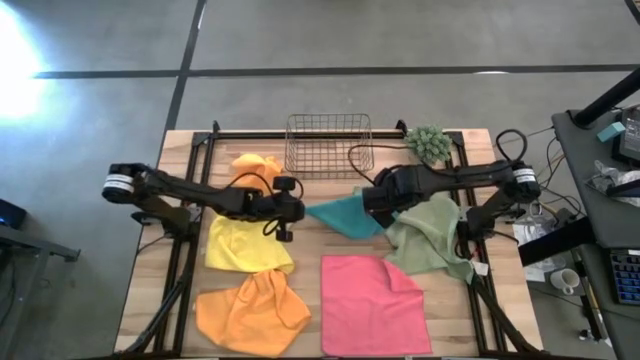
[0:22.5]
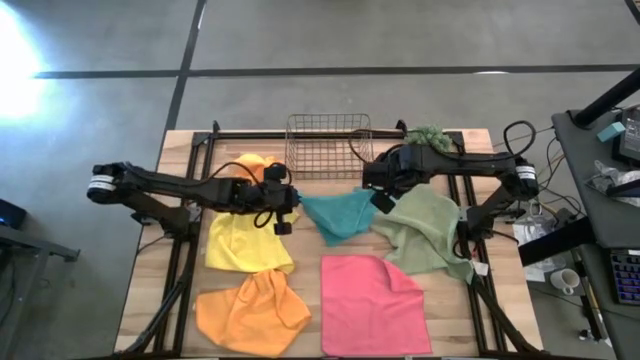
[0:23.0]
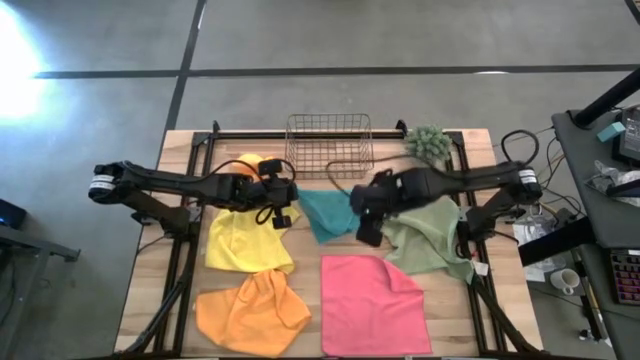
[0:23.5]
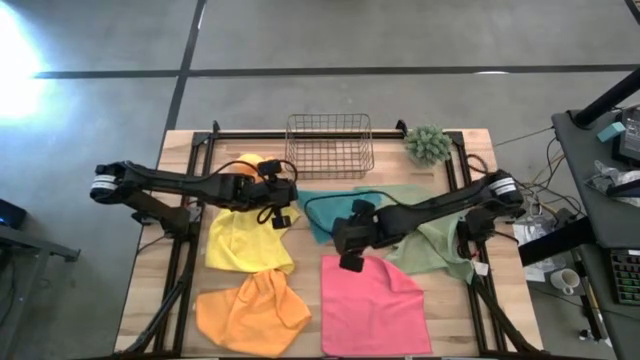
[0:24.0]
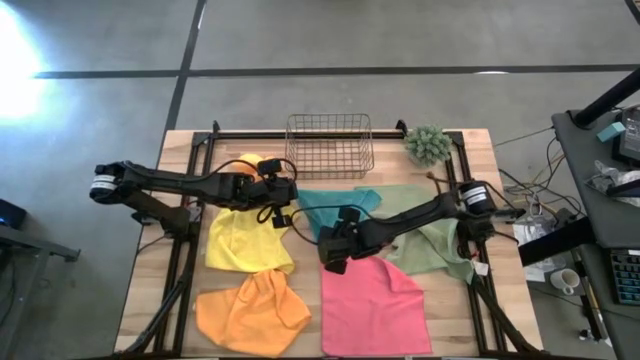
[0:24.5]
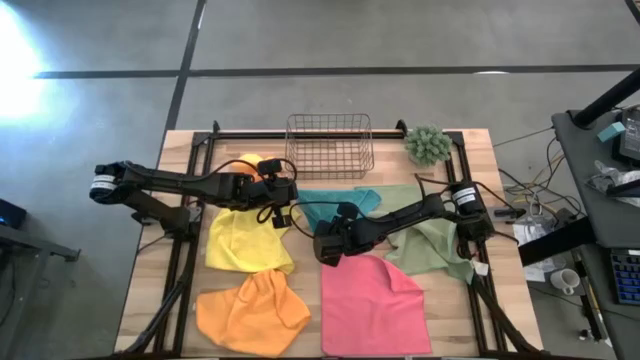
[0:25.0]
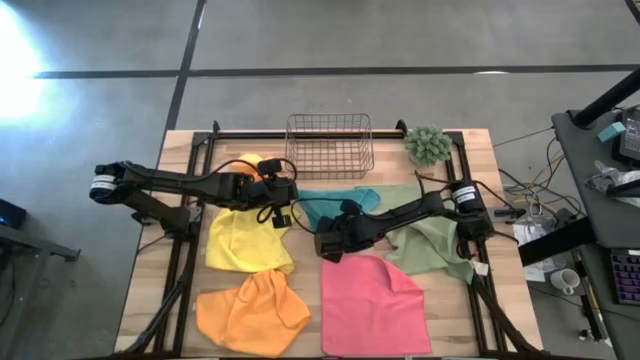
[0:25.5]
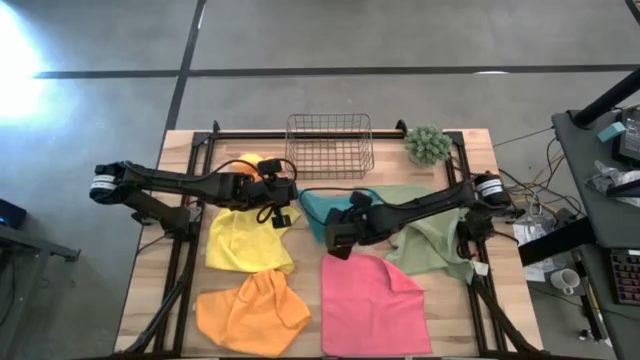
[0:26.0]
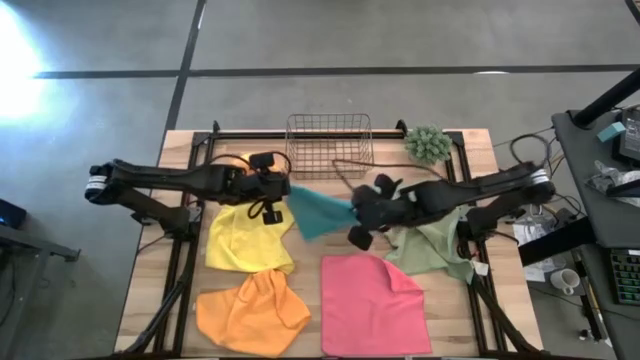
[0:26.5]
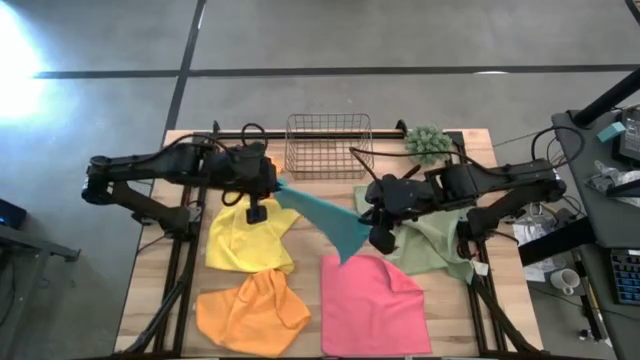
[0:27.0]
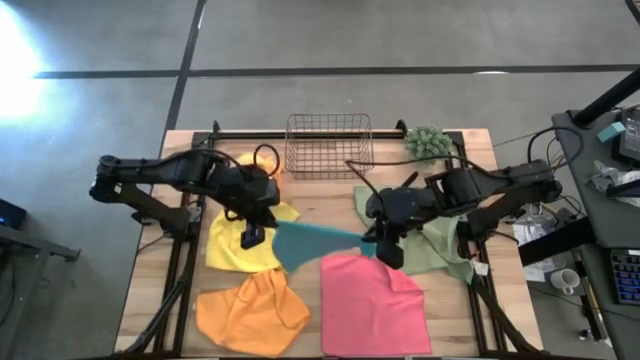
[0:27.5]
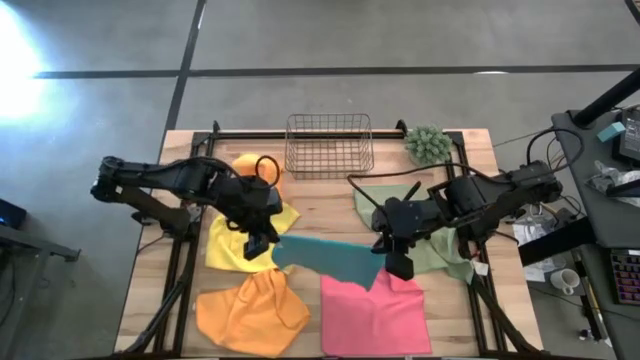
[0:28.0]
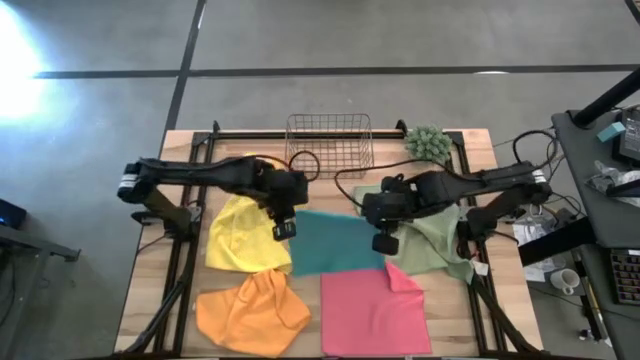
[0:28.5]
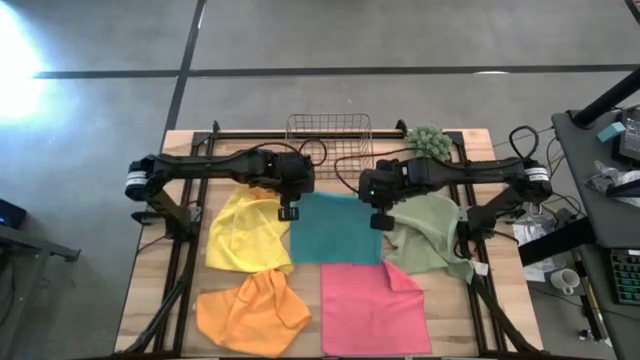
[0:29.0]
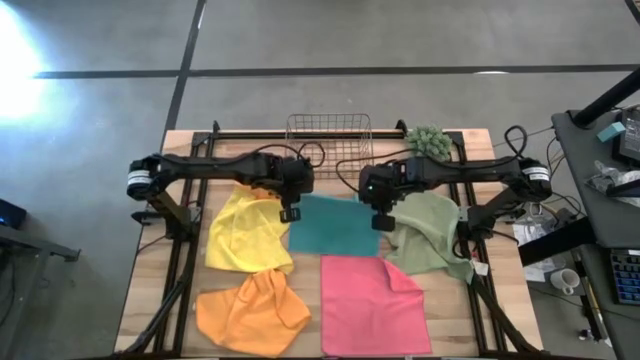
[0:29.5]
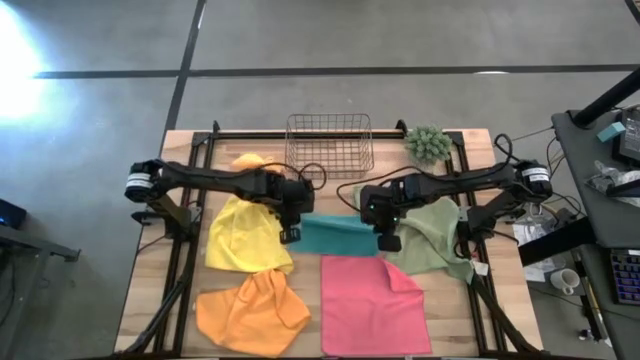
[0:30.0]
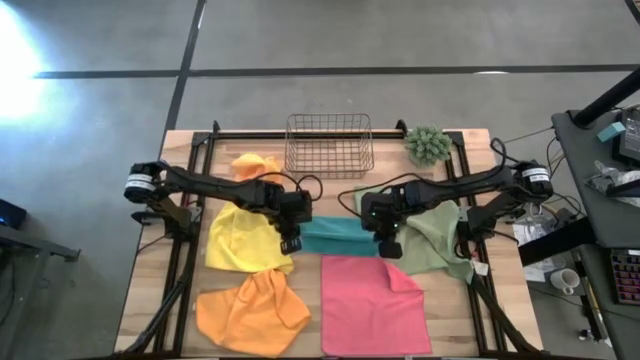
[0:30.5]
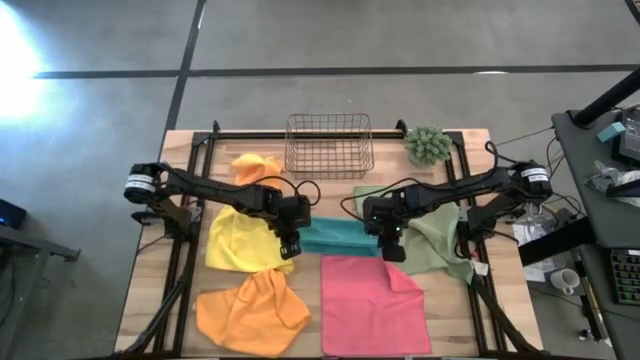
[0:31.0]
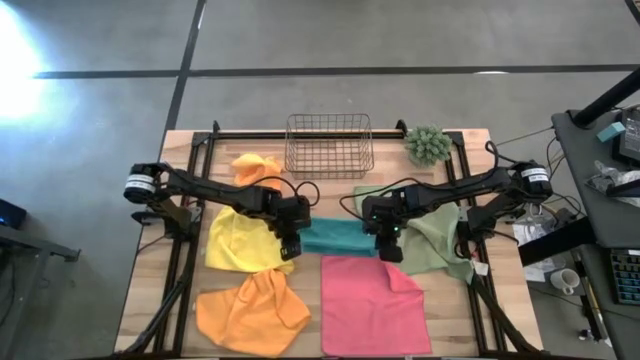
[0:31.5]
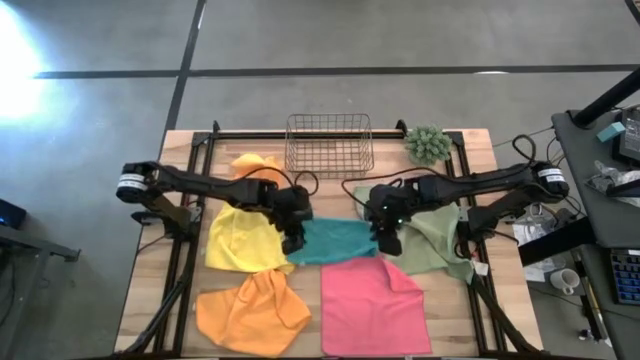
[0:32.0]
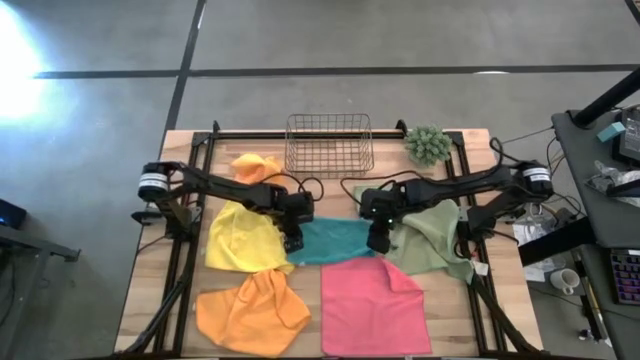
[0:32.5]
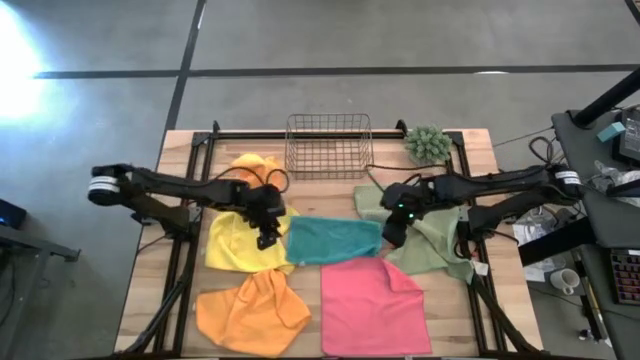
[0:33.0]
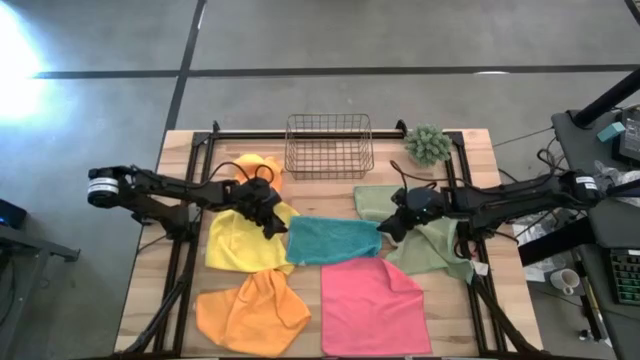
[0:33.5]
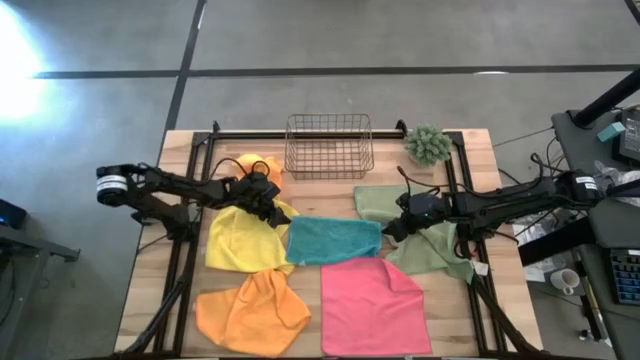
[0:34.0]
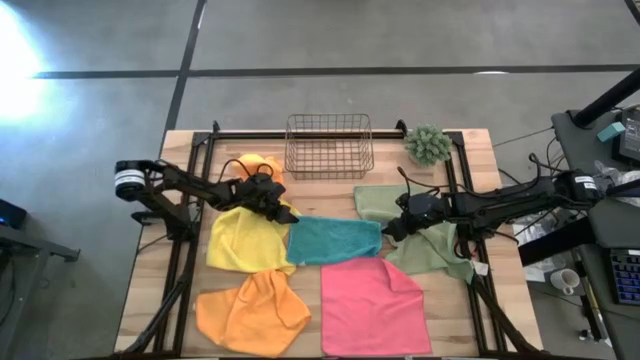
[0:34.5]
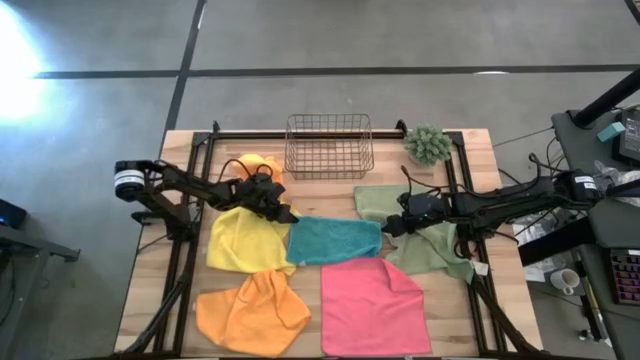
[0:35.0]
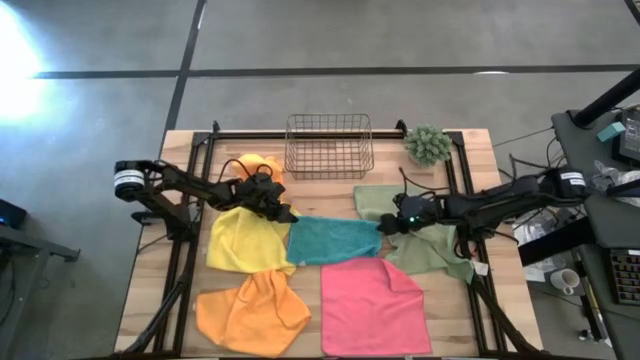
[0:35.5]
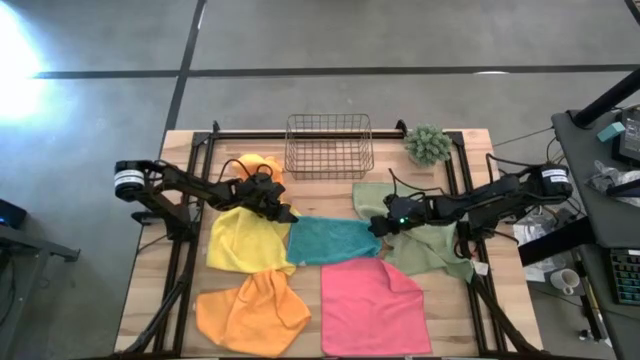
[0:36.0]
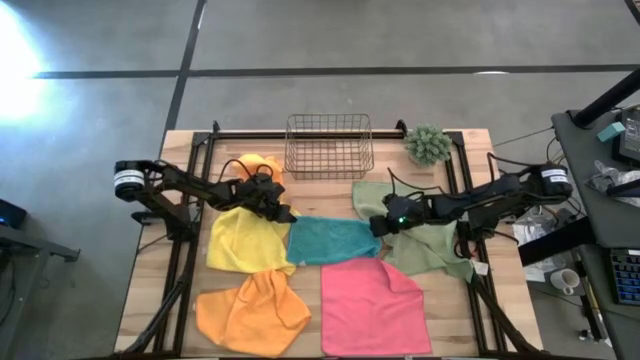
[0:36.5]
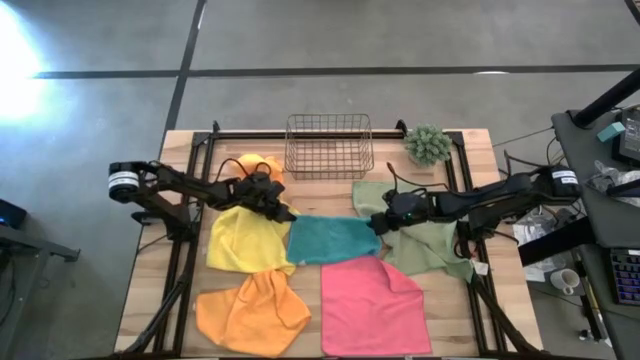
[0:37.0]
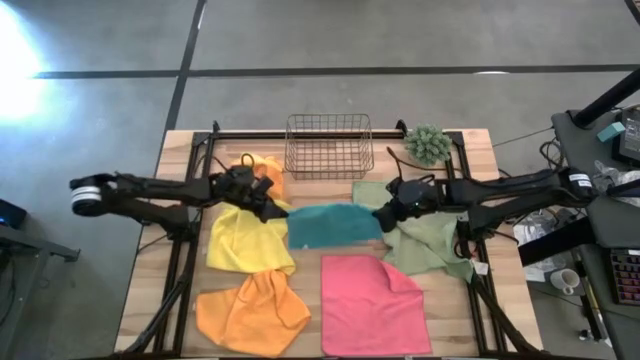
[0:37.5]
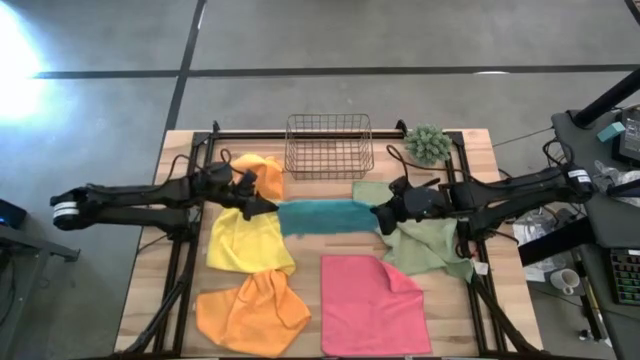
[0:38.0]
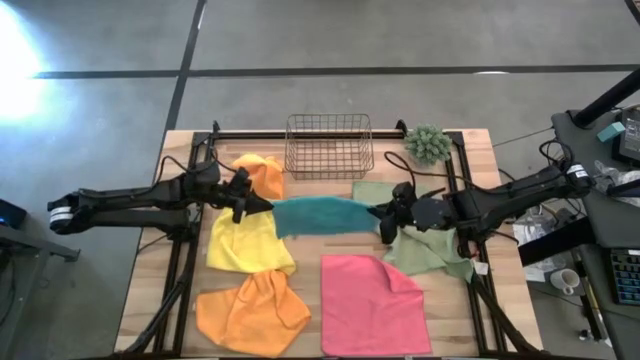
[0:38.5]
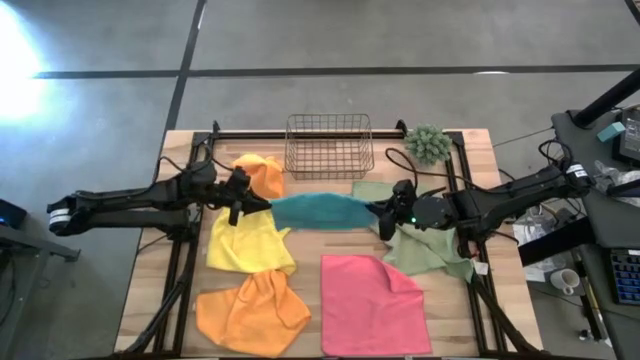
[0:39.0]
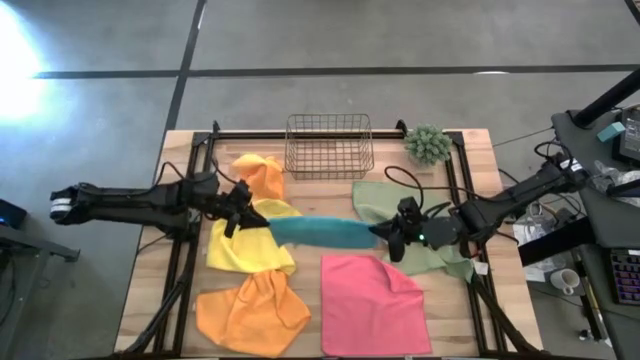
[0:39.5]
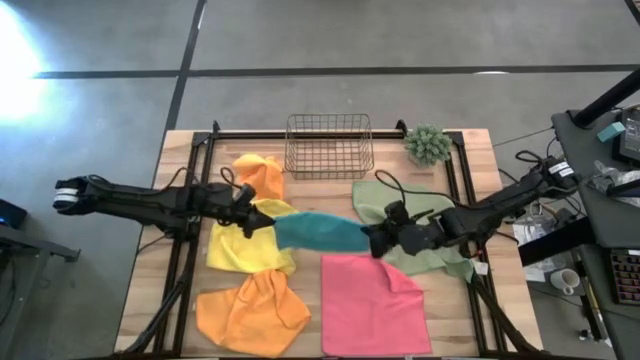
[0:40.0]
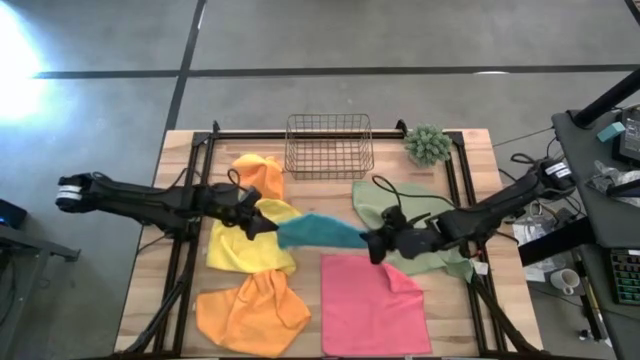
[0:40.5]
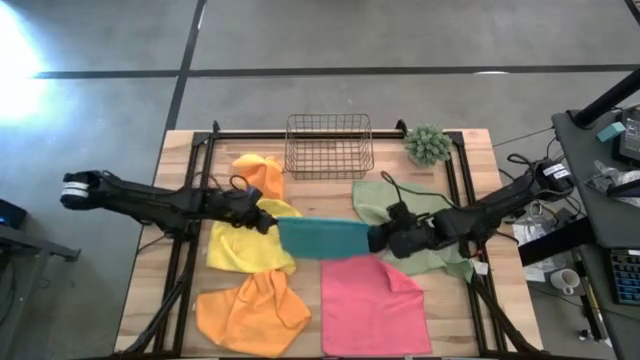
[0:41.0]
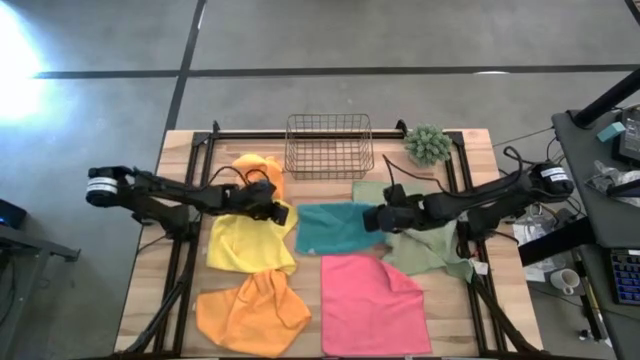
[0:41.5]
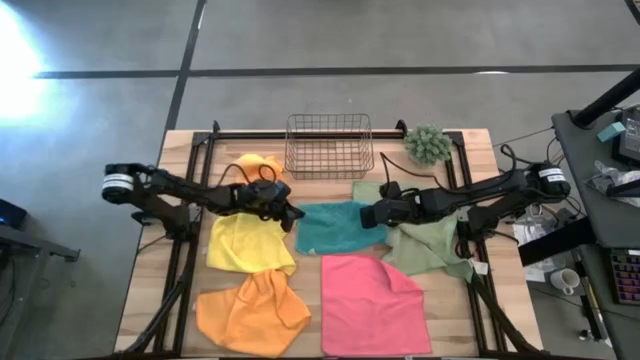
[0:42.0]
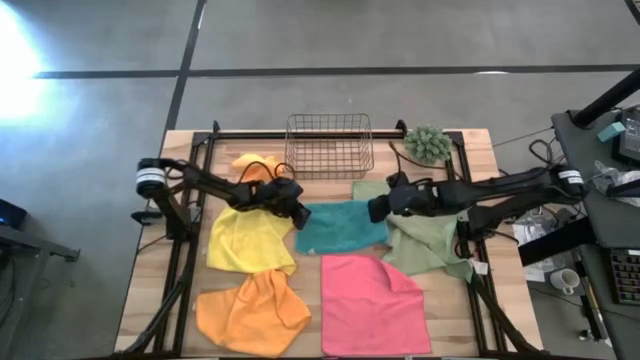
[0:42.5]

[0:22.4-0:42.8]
Task: Fold microfiber towels
Fold the blue microfiber cloth

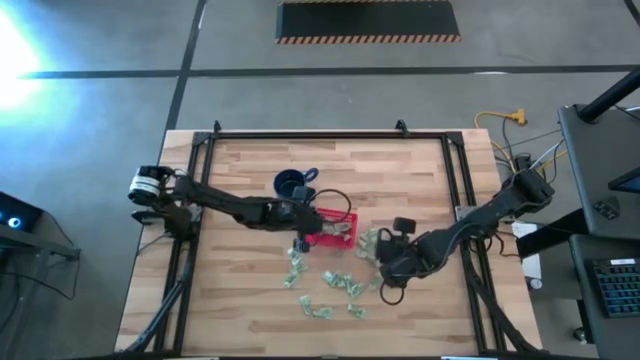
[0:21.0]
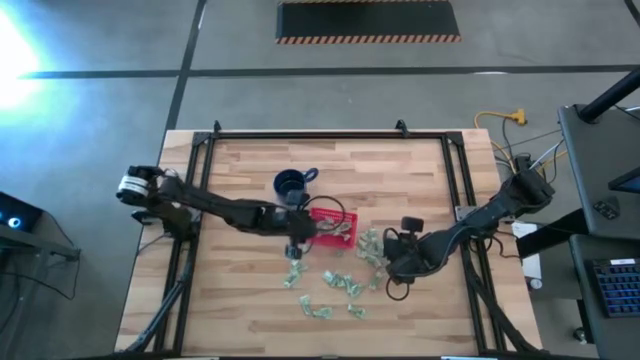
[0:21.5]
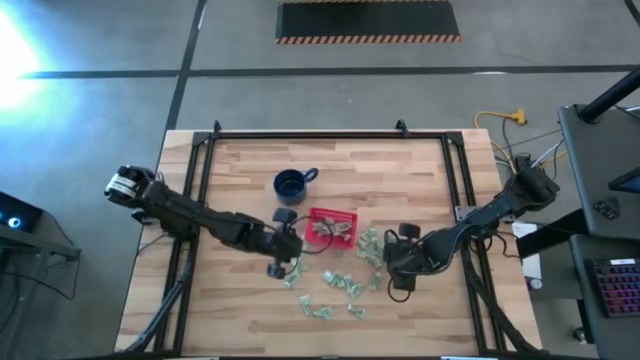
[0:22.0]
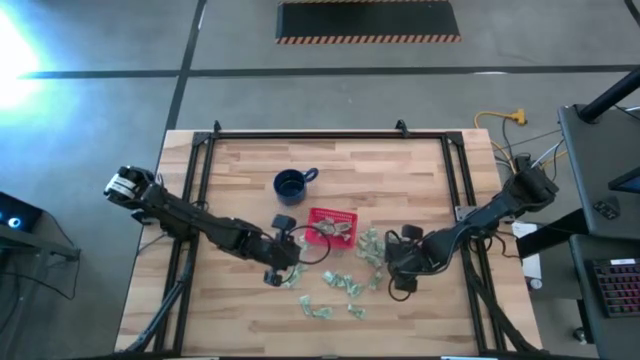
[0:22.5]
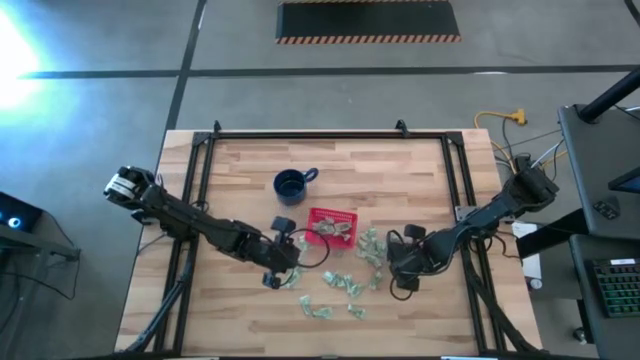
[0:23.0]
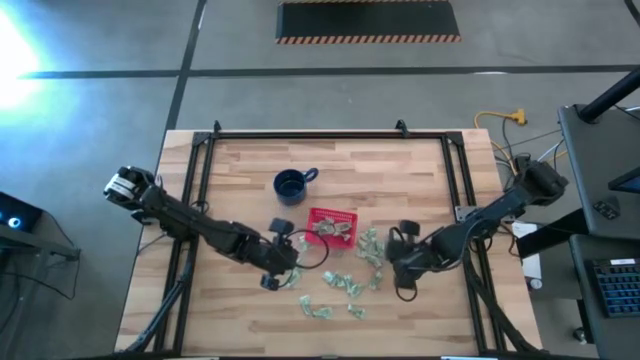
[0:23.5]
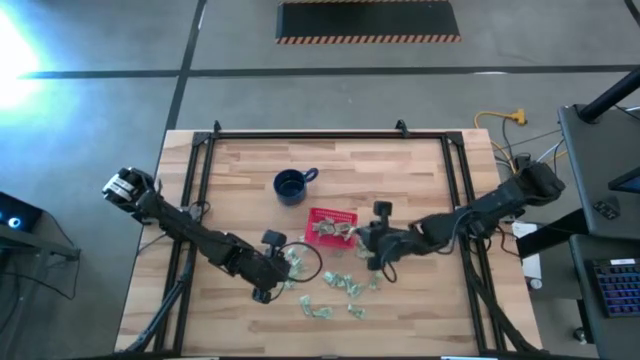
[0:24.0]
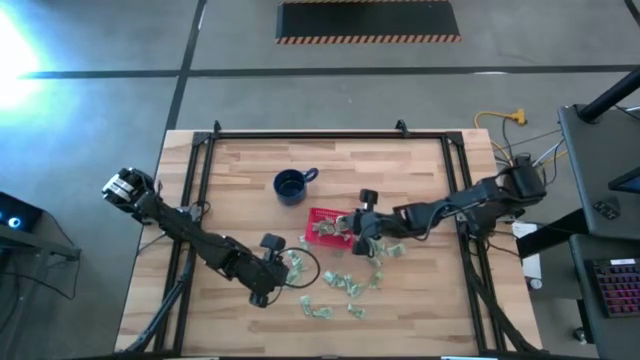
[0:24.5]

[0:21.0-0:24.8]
Task: Pick and place Stevia / Truvia into bins
Put the white stevia packet into the red basket
